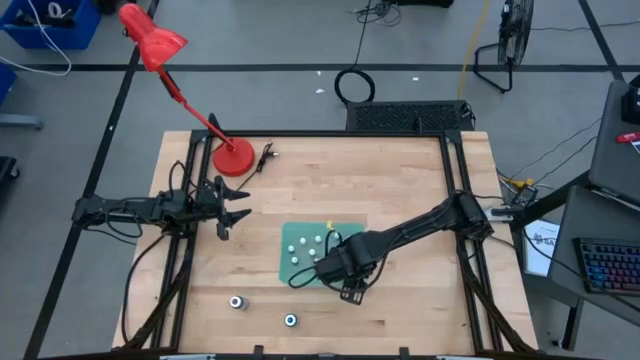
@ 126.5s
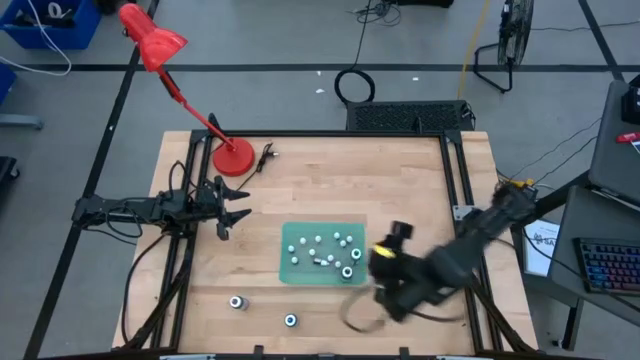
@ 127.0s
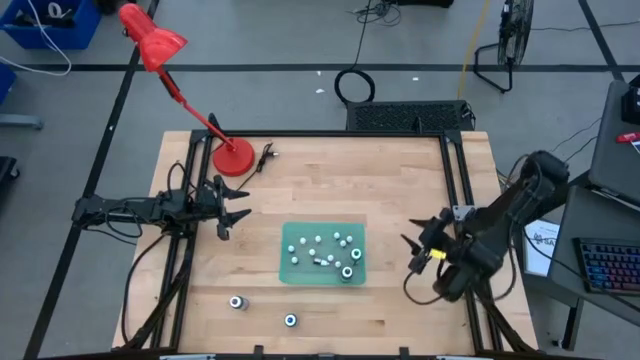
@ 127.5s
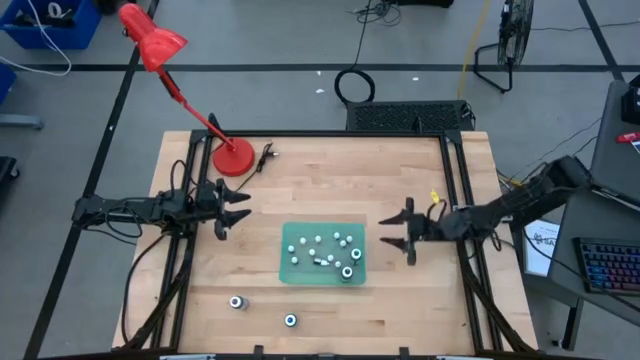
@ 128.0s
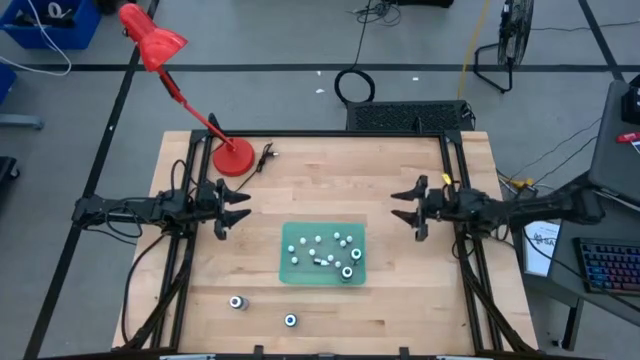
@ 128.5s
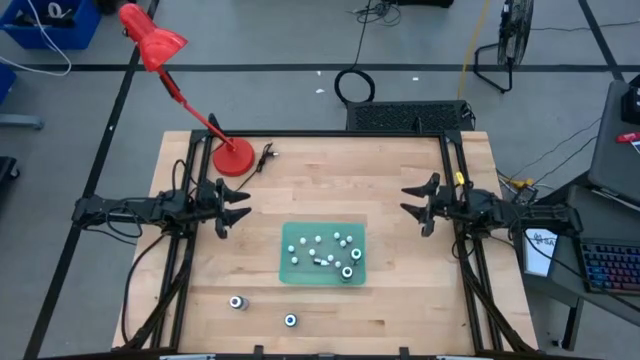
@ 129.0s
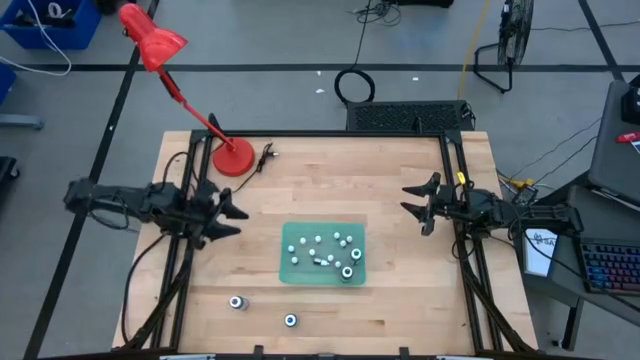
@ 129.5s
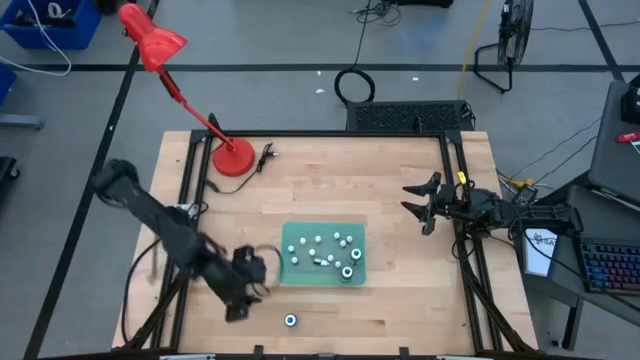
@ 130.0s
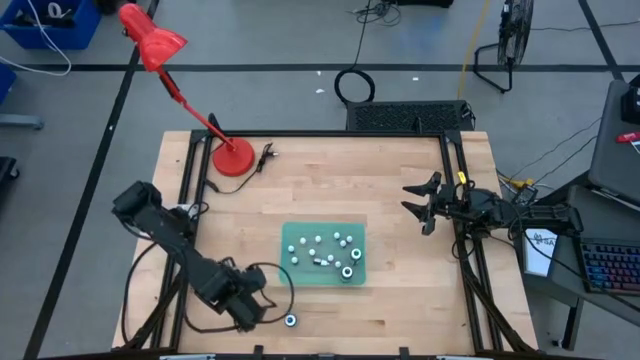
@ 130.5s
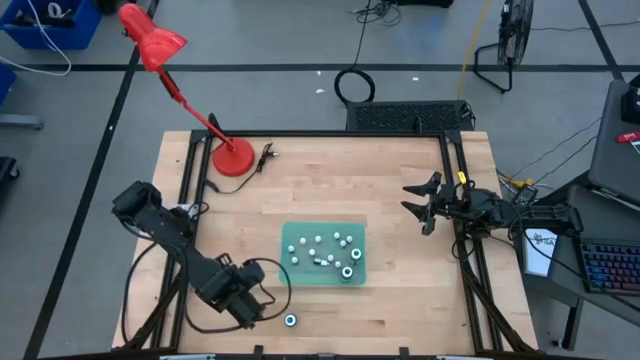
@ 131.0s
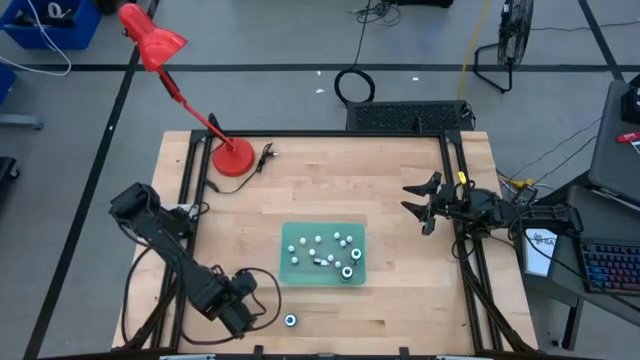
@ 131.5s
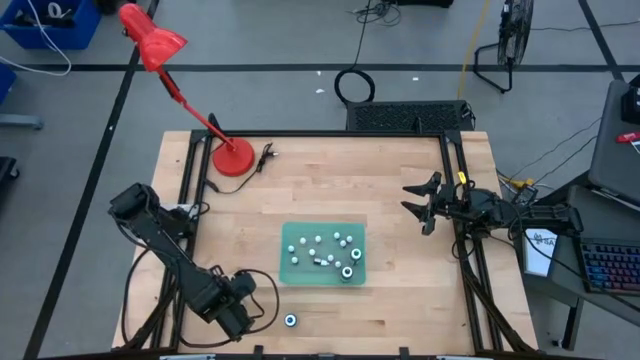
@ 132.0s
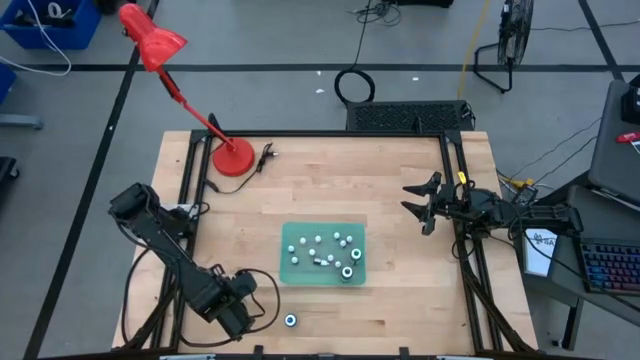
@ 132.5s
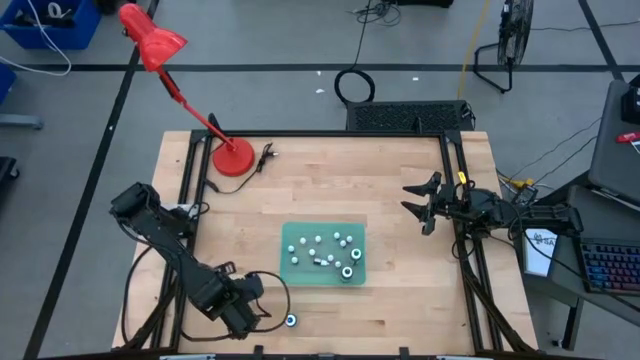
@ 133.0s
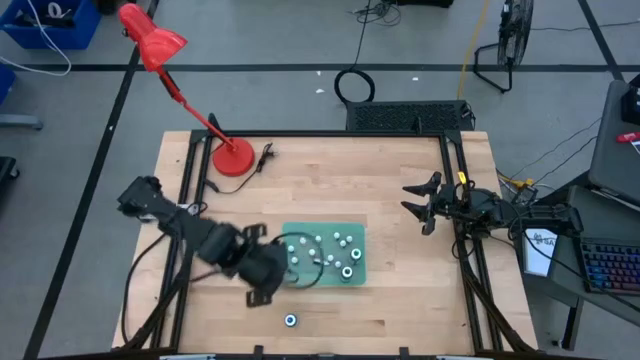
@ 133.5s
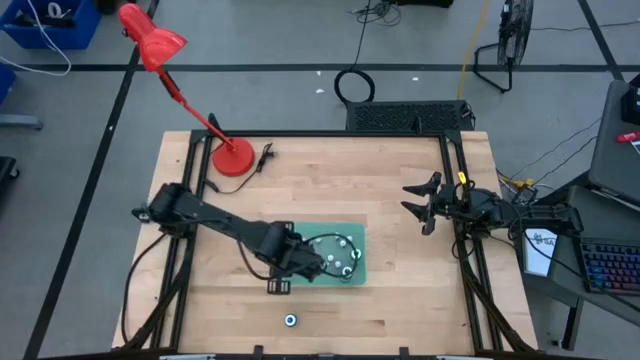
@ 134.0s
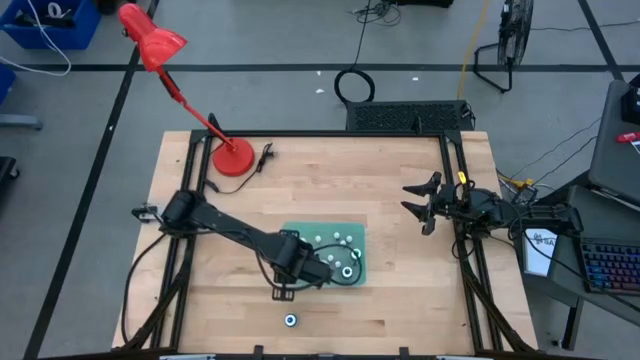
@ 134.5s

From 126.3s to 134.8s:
Task: Pick & Place food coloring
Put the large violet food coloring bottle into the green bin

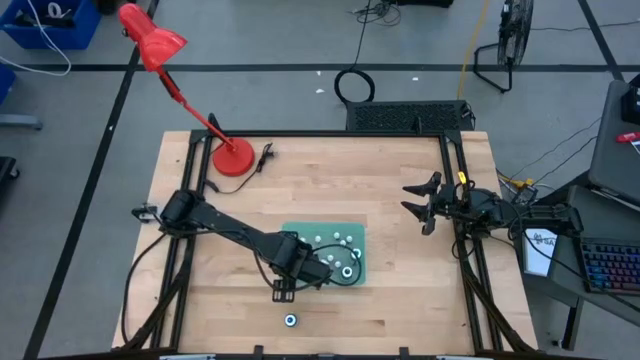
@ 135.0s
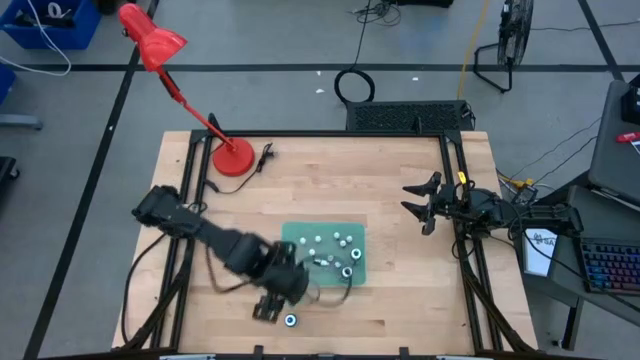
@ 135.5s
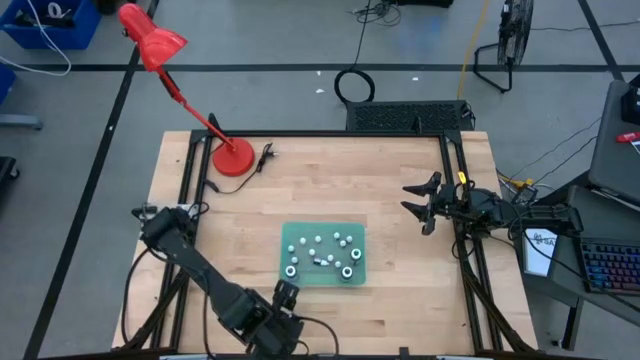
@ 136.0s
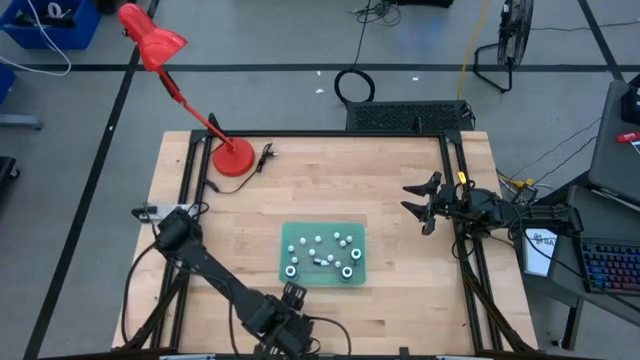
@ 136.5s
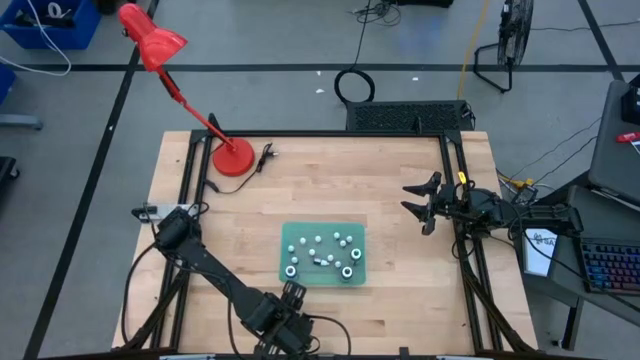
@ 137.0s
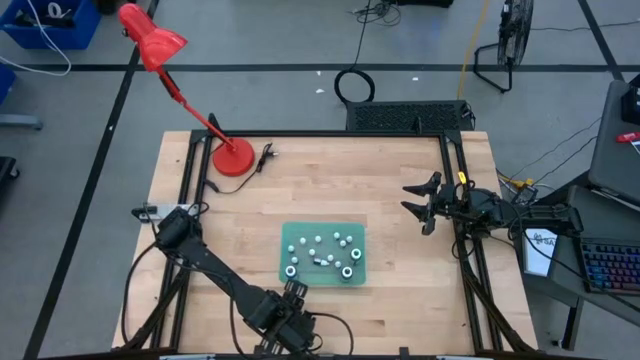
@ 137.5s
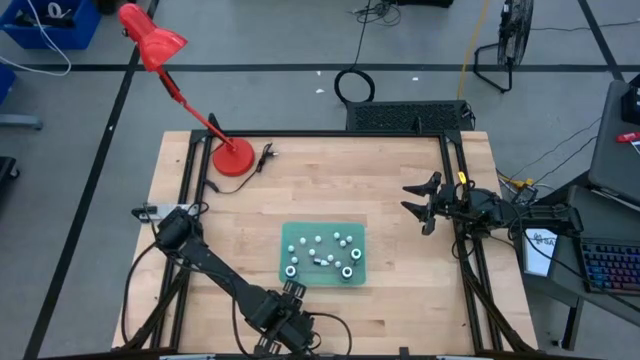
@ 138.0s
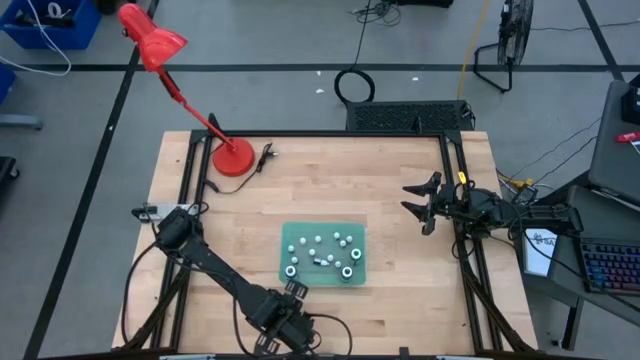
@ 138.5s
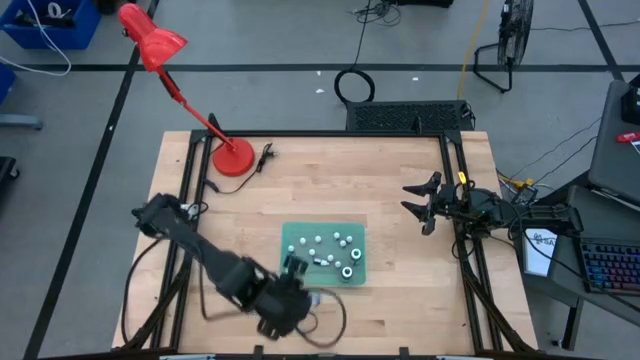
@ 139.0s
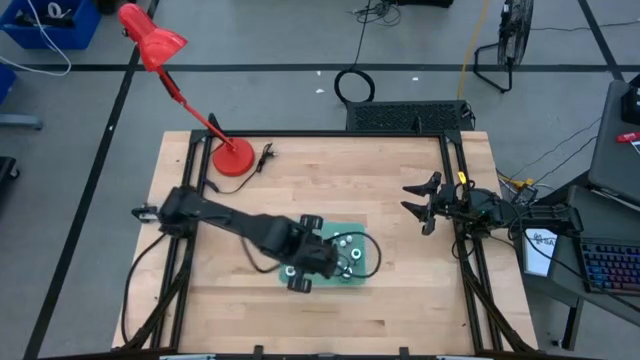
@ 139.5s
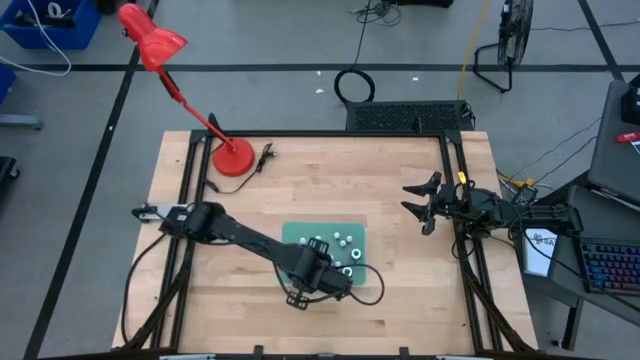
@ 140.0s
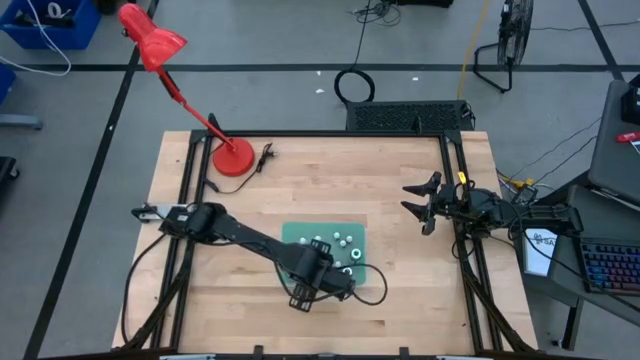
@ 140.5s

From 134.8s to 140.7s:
Put the large blue food coloring bottle into the green bin

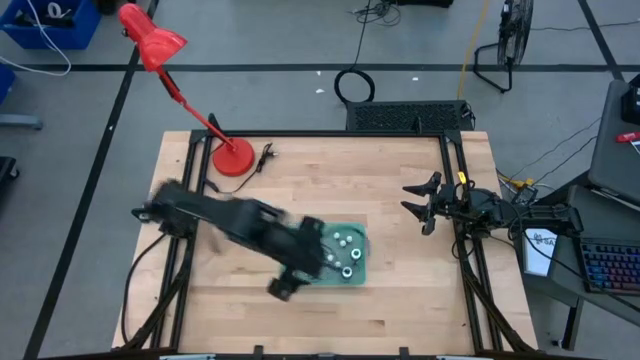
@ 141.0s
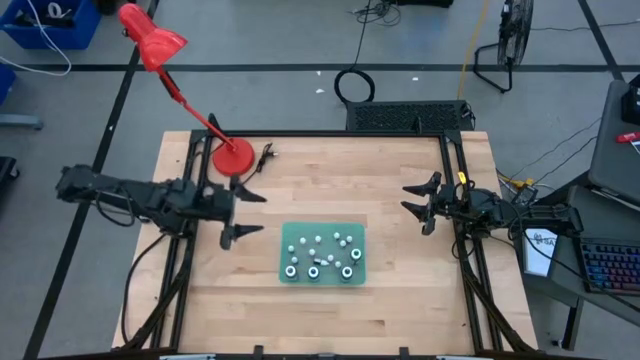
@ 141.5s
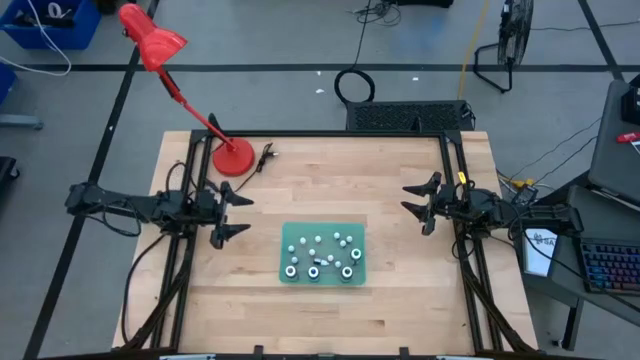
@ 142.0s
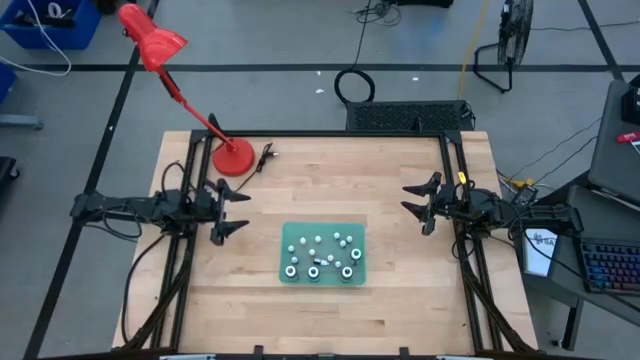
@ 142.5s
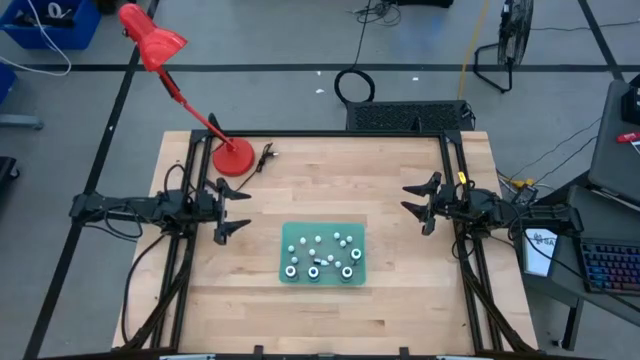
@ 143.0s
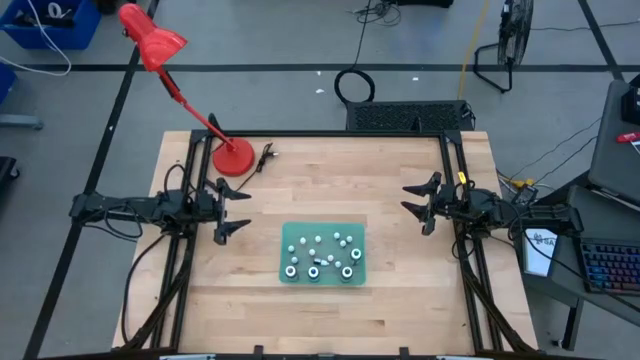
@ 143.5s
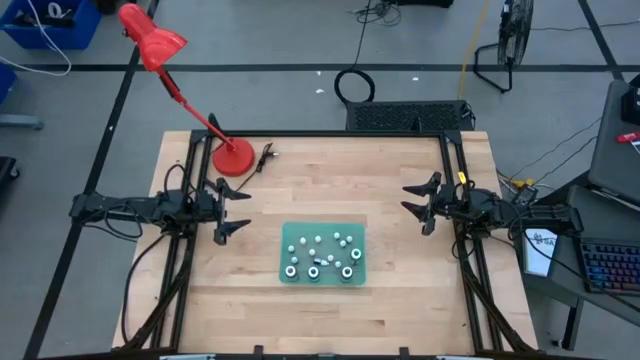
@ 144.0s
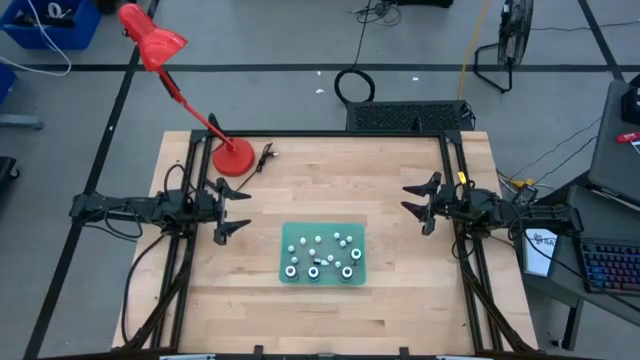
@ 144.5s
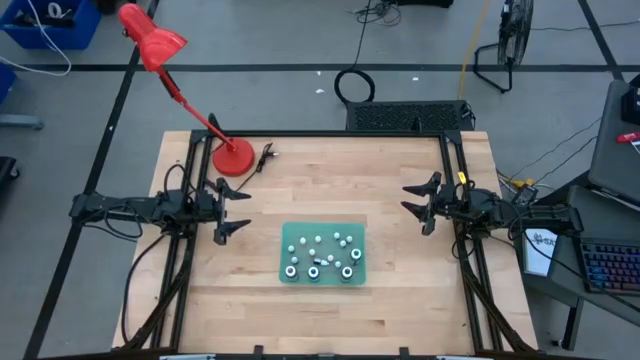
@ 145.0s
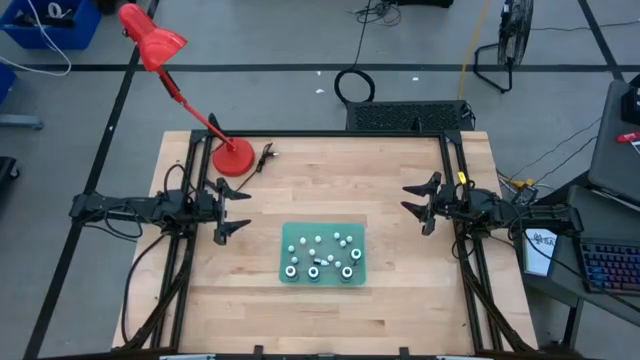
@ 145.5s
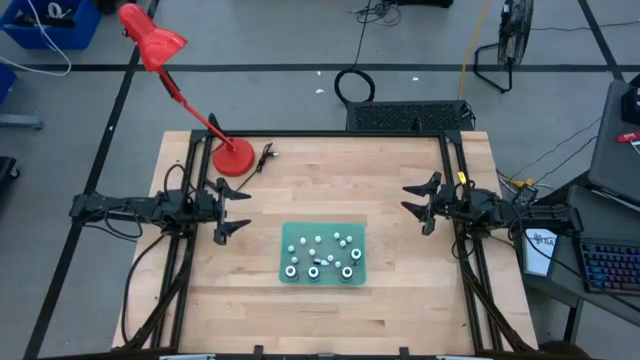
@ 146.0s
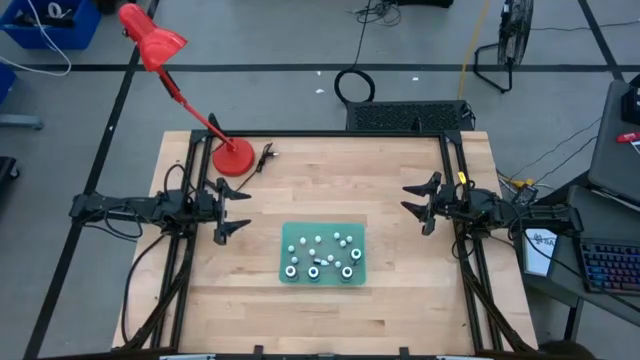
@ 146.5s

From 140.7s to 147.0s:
Return to Home Position

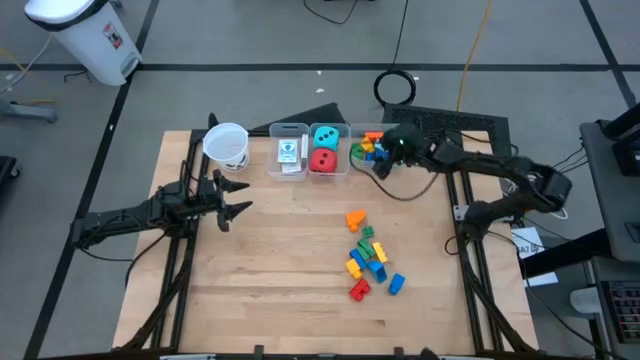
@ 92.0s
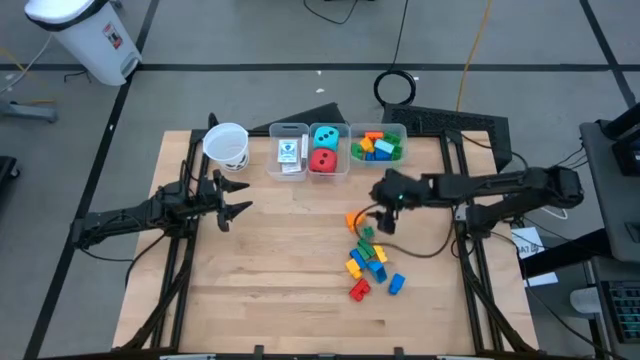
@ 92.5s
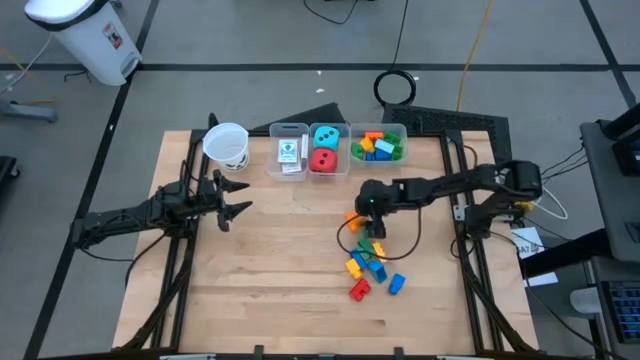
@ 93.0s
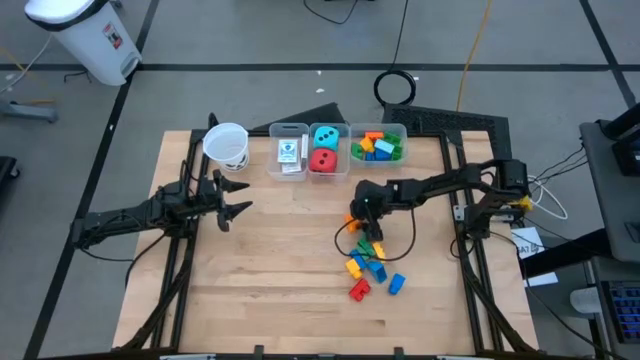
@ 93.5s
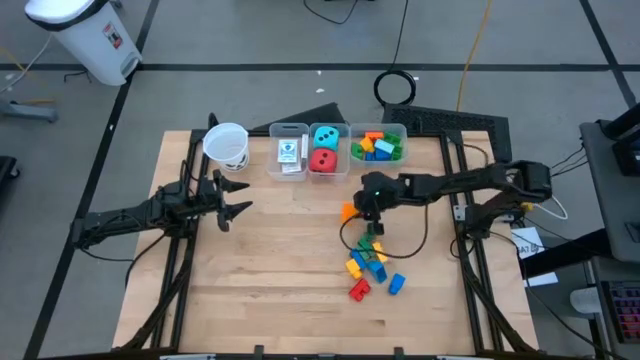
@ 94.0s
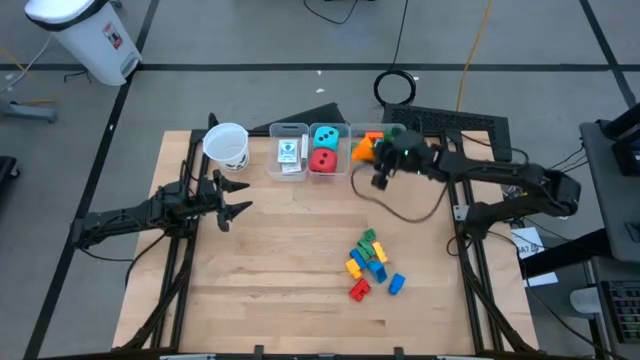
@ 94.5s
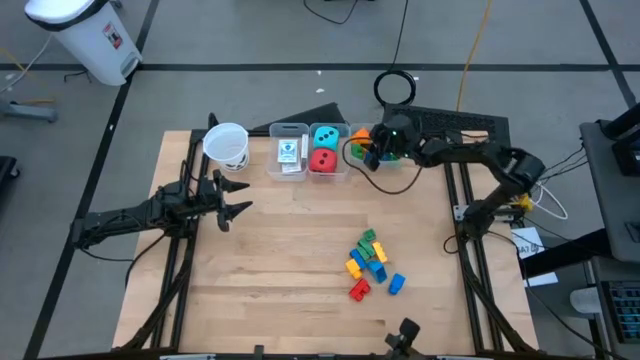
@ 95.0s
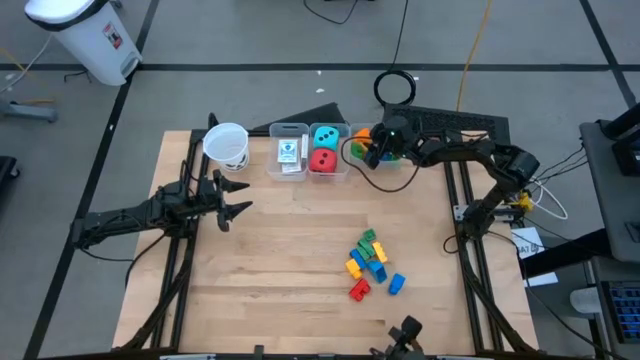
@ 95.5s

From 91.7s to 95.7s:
Task: Pick & Place Toys
Put the orange game piece into the right transparent bin
